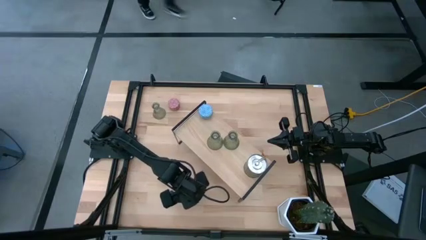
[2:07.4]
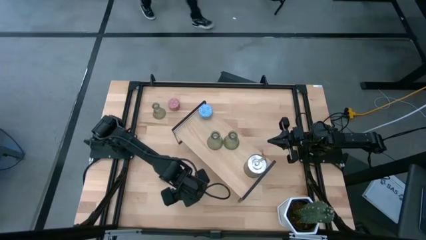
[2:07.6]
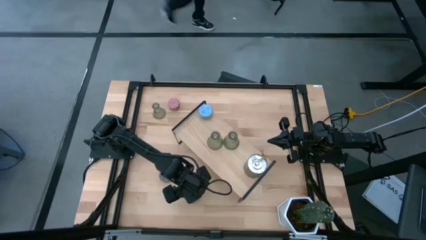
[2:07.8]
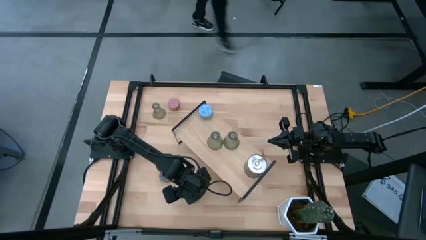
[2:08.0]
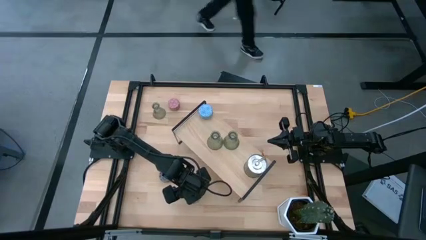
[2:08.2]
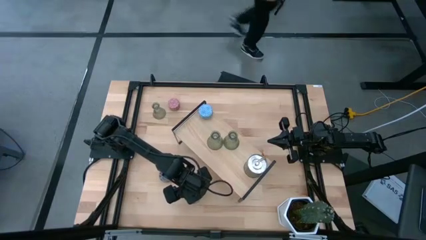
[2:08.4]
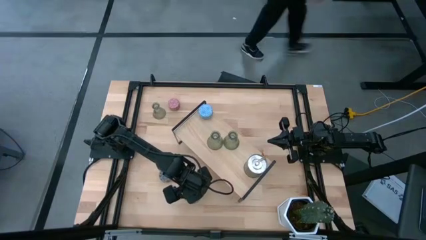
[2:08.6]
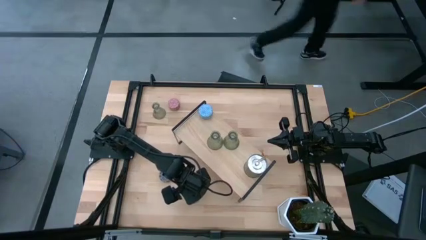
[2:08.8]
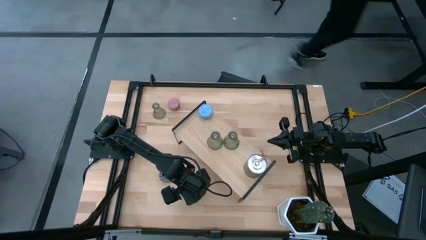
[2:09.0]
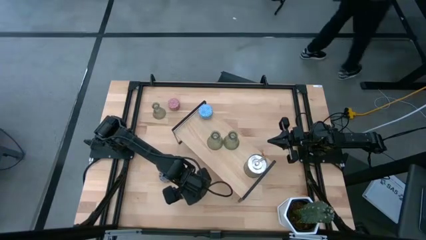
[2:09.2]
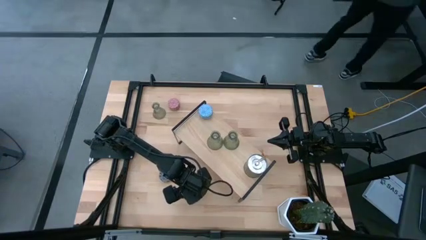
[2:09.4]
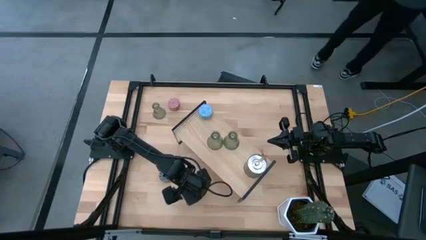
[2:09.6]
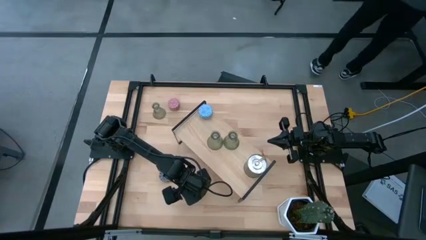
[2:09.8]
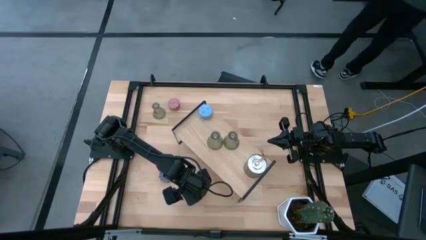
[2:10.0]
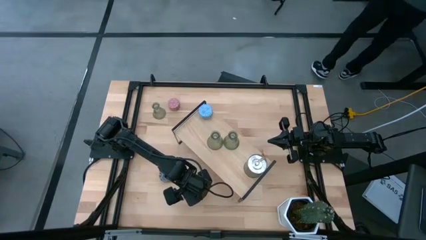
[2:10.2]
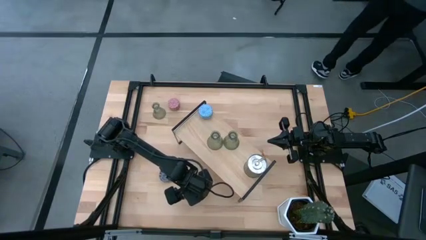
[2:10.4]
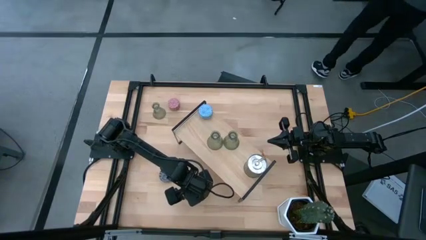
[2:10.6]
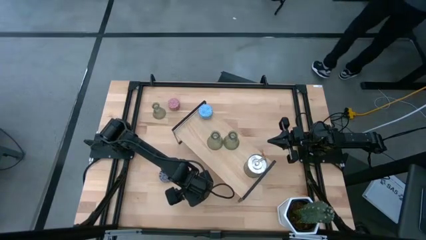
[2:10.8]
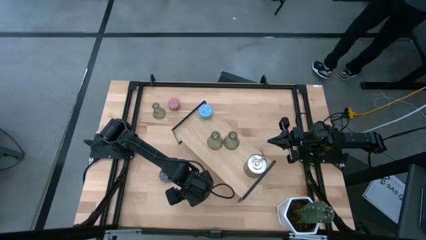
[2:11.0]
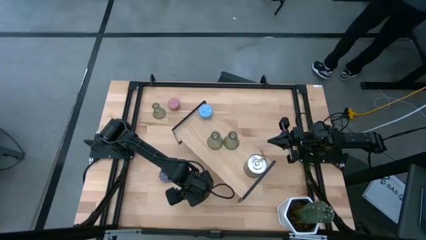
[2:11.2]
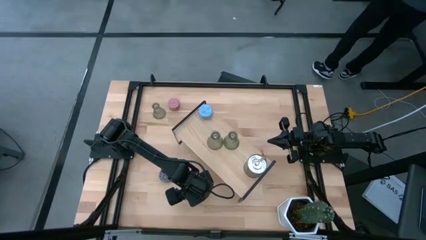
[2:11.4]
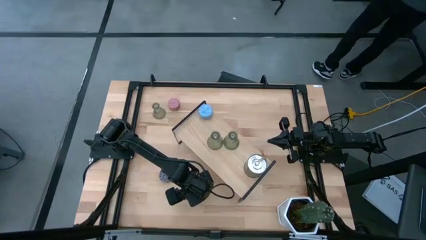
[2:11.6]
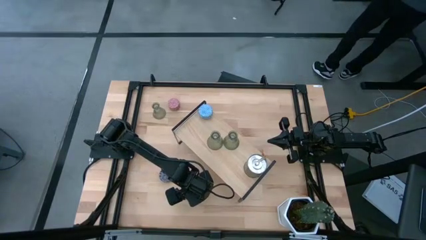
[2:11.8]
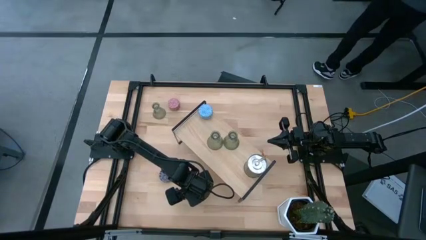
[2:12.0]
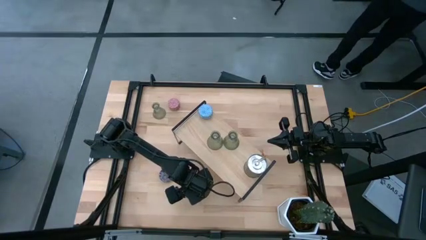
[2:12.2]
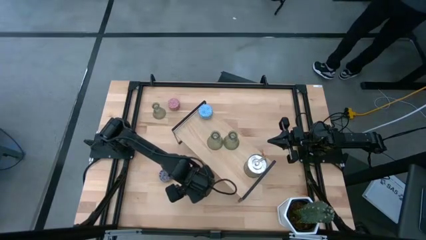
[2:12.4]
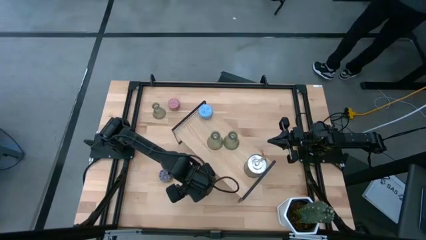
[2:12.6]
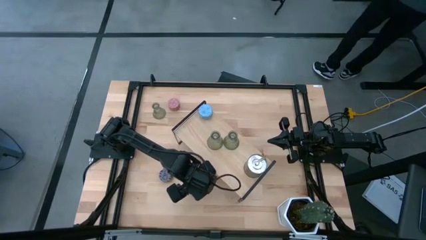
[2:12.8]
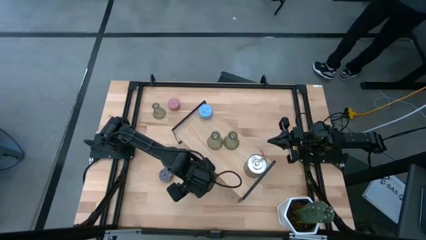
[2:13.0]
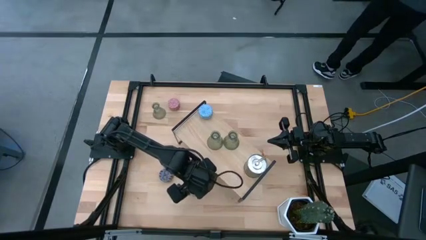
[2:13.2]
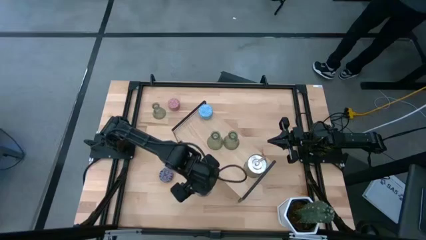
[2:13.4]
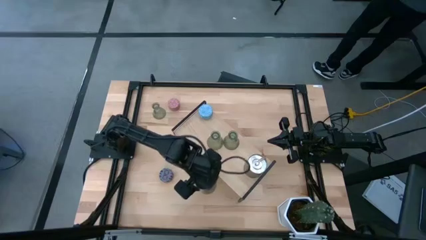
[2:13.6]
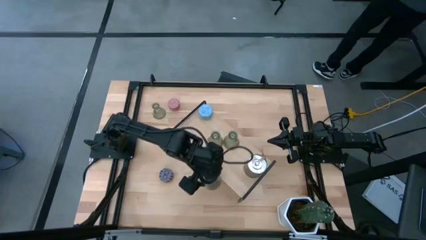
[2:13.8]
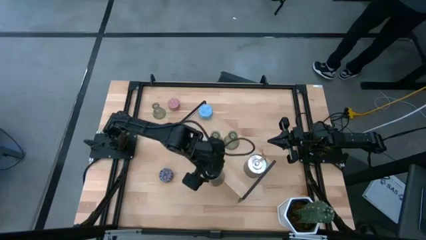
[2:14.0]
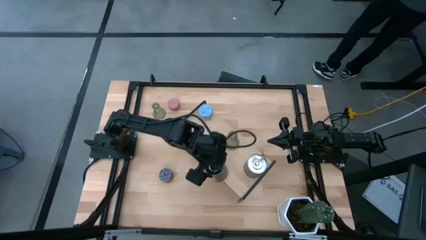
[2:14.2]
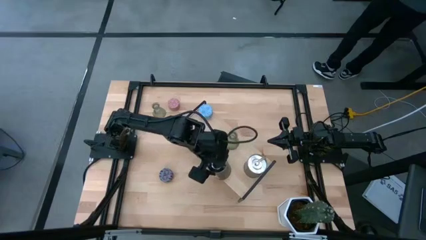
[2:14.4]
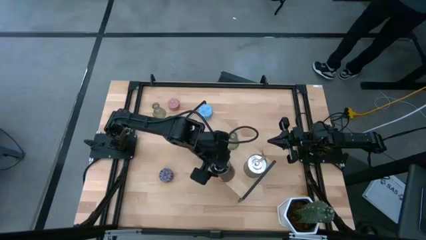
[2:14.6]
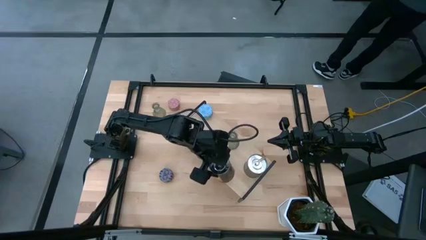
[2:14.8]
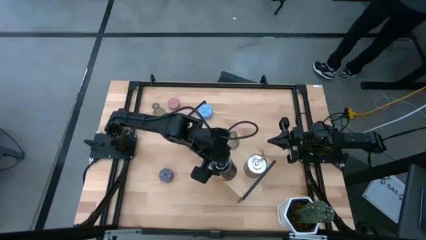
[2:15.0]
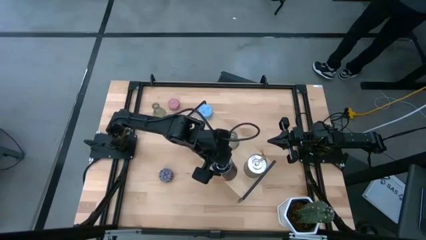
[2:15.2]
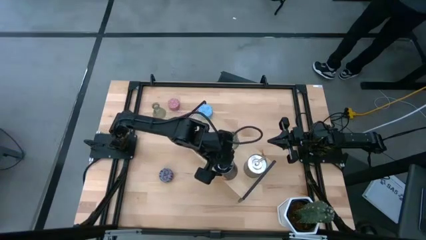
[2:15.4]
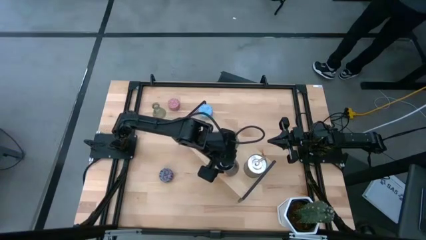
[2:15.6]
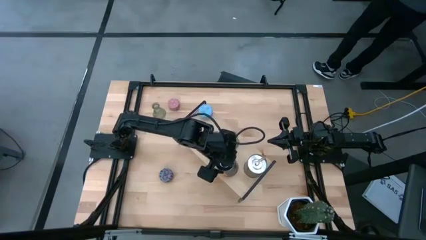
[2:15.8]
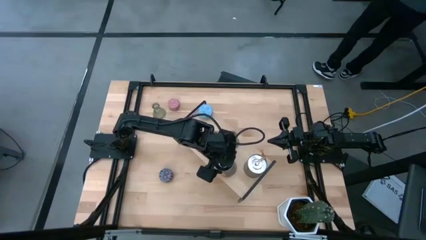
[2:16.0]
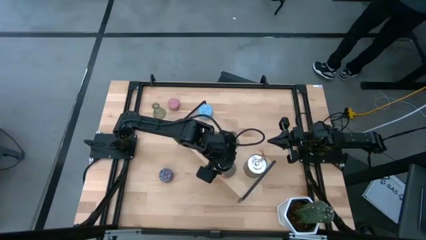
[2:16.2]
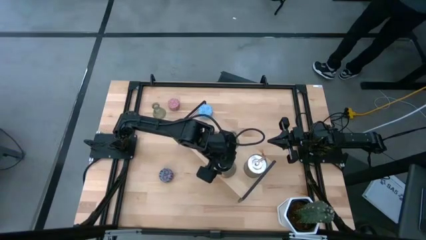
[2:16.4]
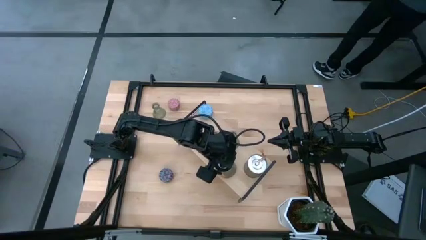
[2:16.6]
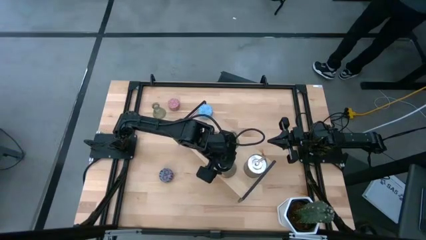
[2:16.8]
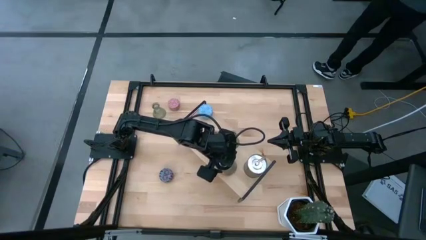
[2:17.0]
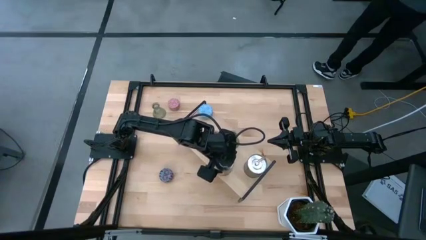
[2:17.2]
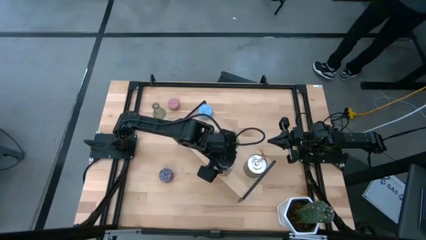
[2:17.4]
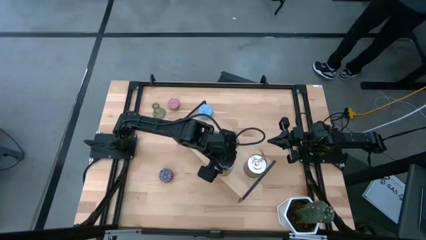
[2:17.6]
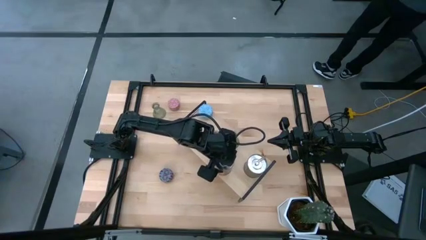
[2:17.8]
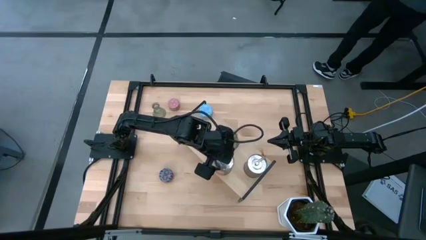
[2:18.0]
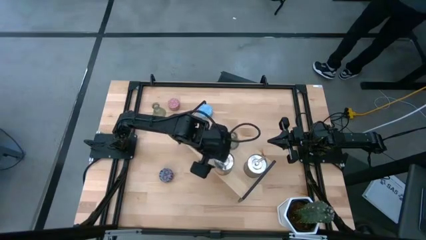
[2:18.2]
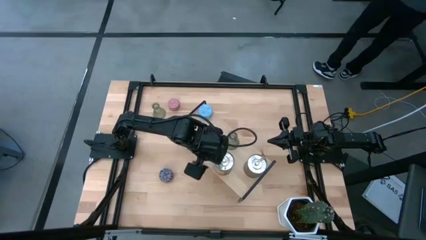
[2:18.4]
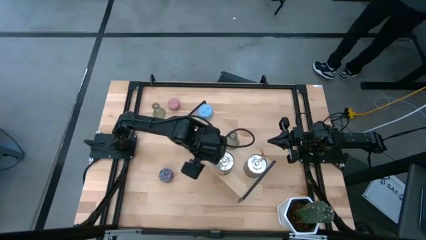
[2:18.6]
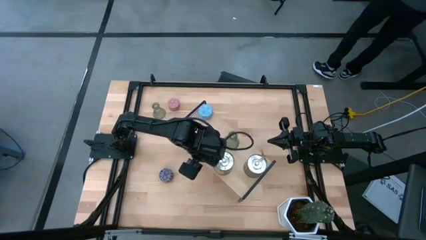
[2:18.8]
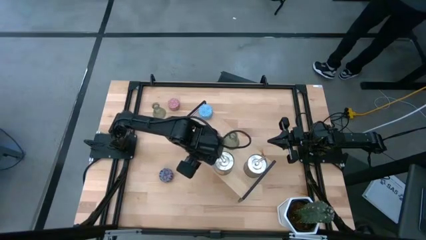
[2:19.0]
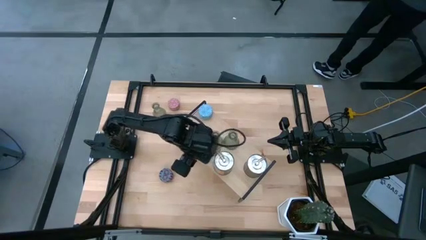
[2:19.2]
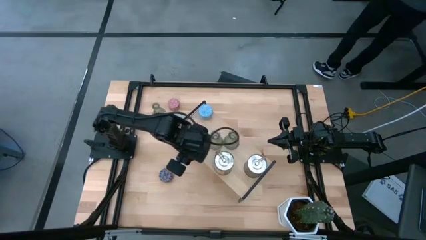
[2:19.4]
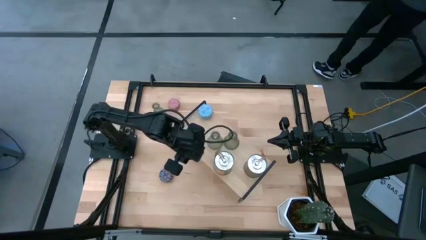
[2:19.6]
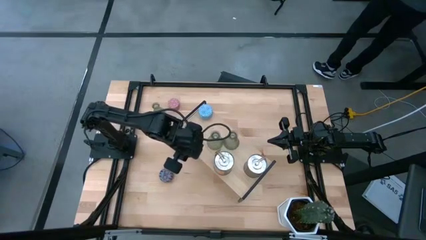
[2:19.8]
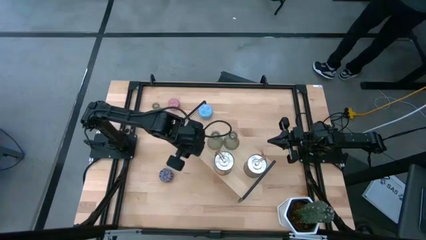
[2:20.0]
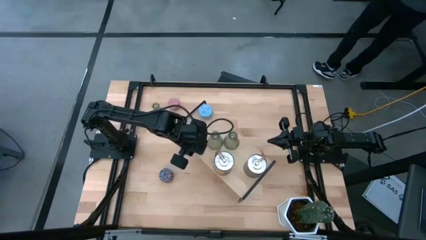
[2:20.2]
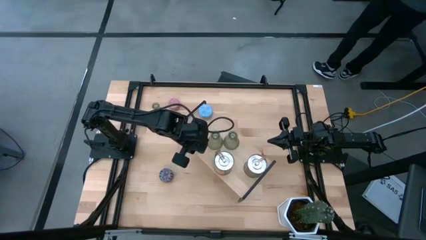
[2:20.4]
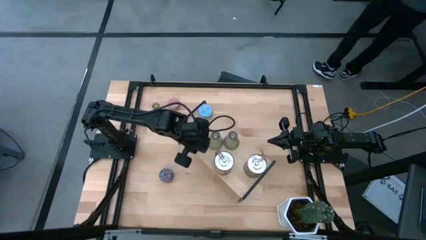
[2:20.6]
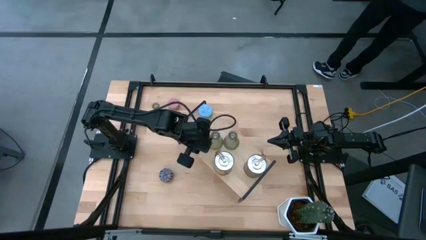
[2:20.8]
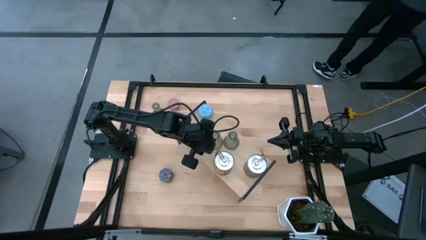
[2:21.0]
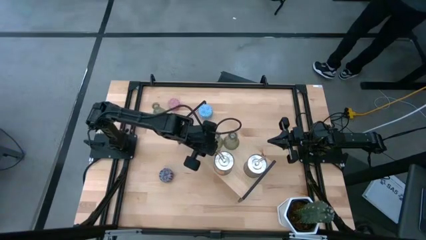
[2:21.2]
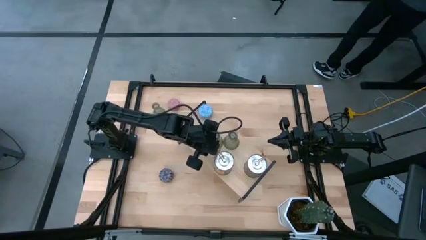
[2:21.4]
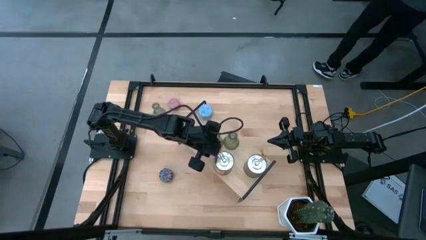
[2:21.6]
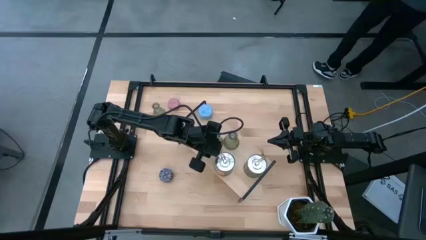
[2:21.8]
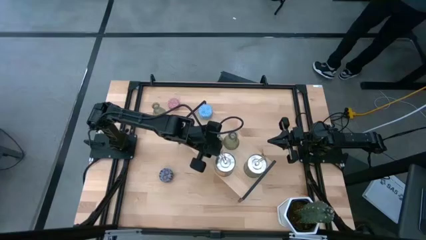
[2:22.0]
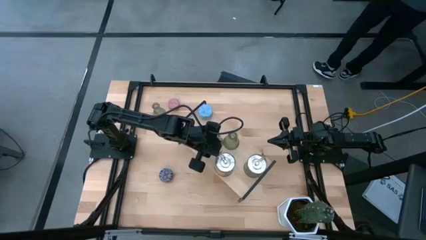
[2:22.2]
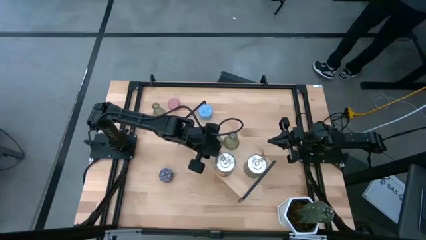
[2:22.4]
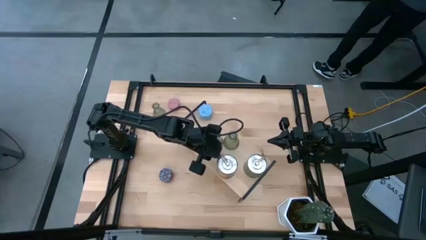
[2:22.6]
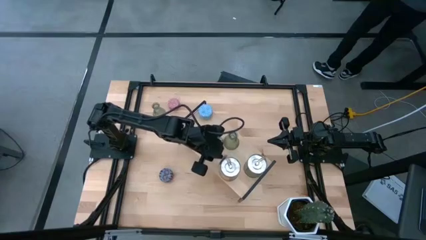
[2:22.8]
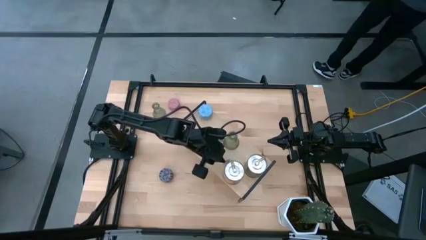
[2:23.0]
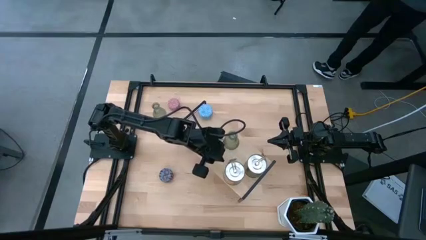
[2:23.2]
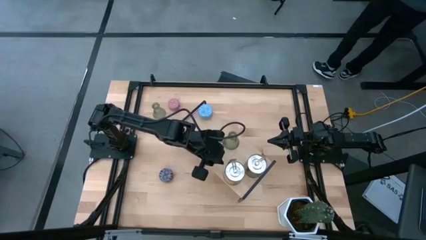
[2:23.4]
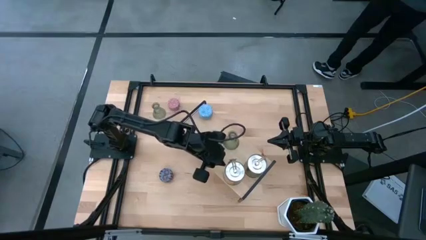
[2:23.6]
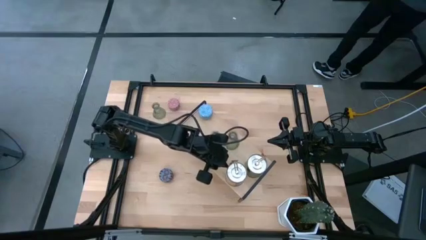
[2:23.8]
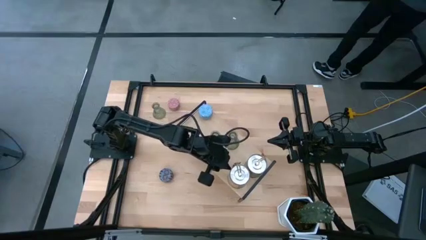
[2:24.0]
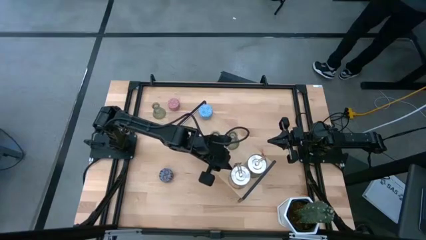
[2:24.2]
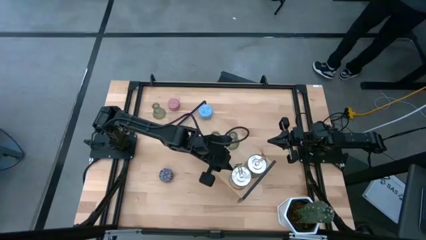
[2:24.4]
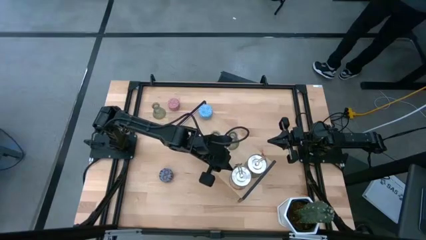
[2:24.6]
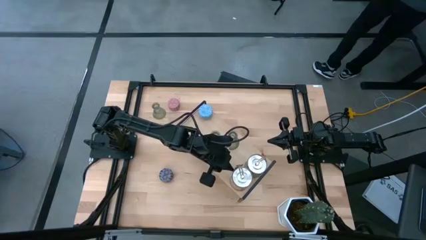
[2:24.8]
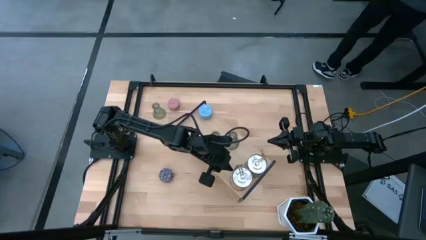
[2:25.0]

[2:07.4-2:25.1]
Task: Pick & Place candle stick holders
Put the silver scented candle can on the shelf
